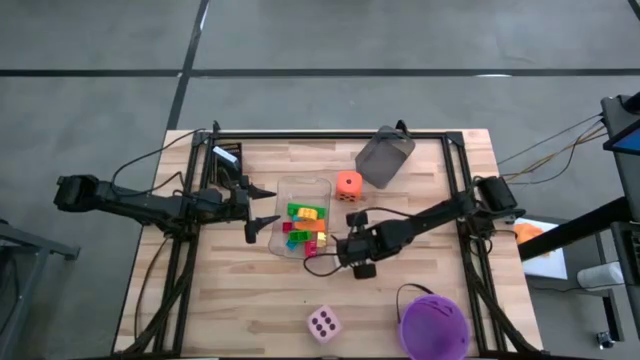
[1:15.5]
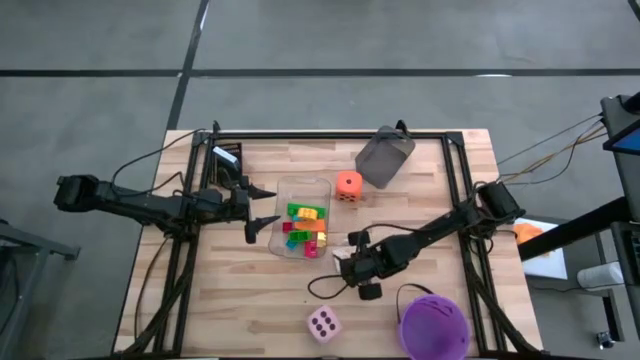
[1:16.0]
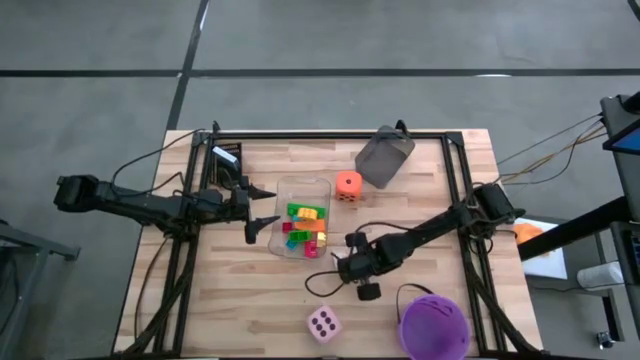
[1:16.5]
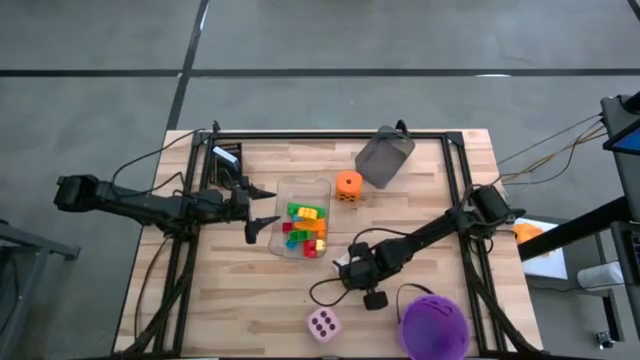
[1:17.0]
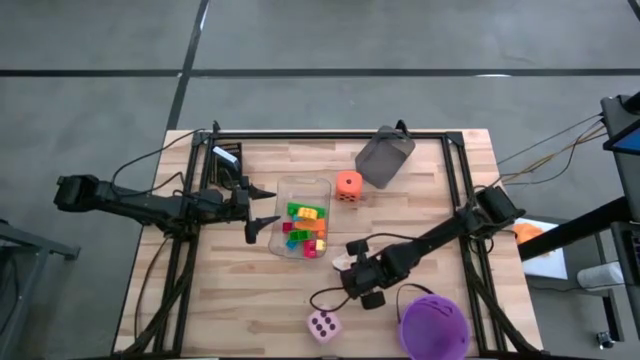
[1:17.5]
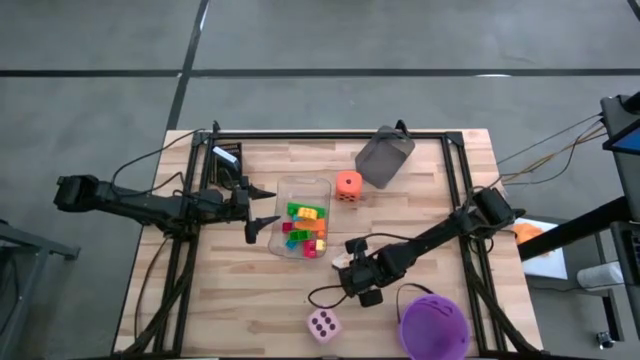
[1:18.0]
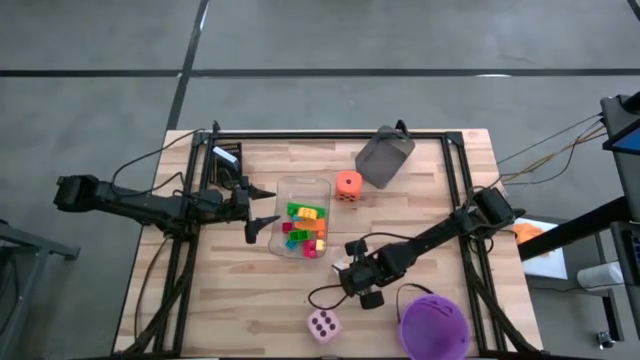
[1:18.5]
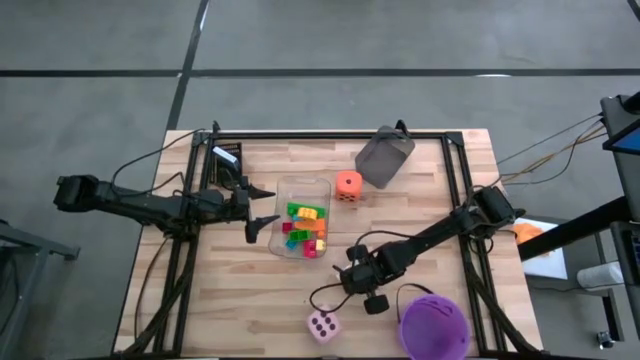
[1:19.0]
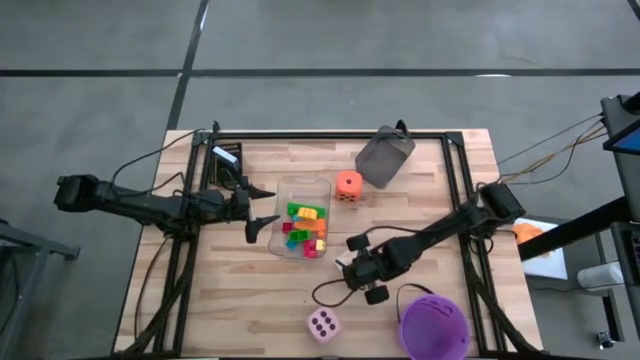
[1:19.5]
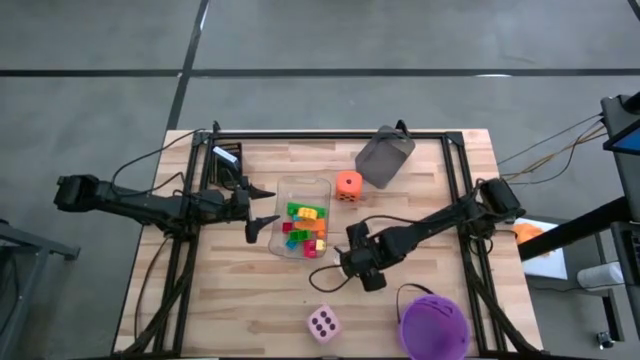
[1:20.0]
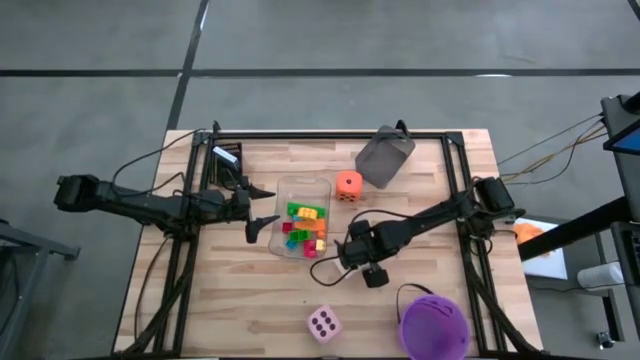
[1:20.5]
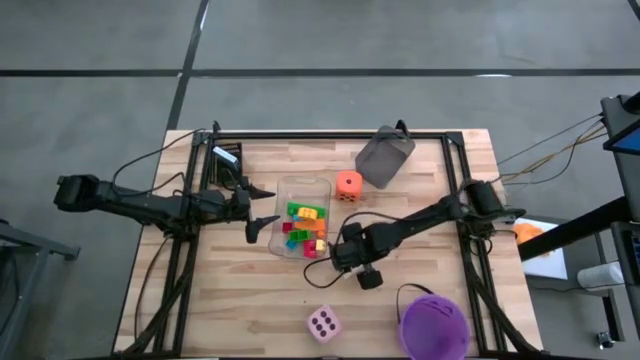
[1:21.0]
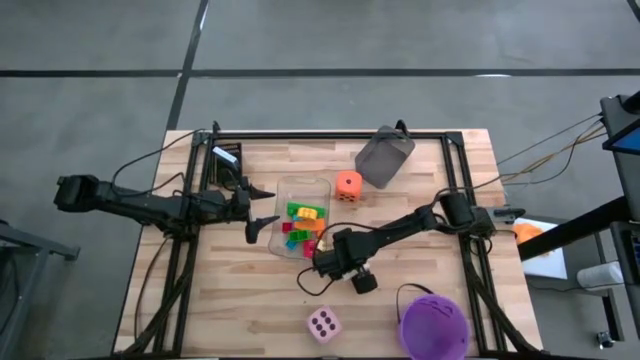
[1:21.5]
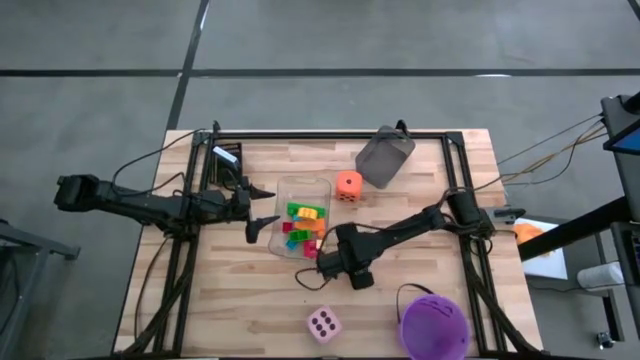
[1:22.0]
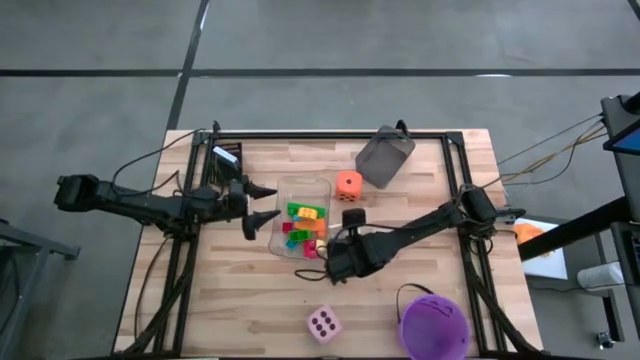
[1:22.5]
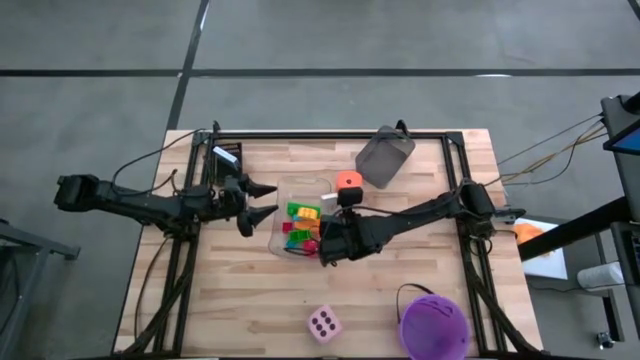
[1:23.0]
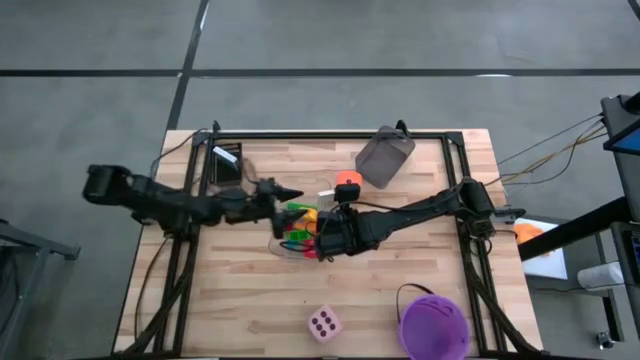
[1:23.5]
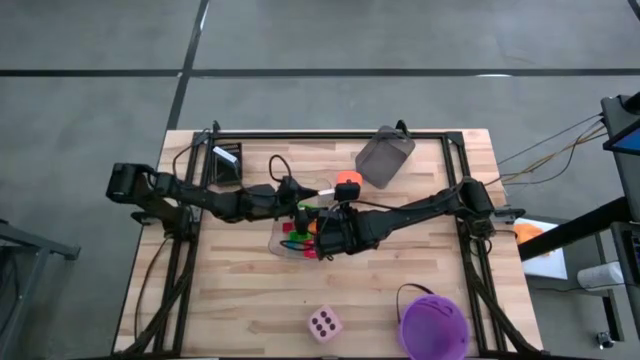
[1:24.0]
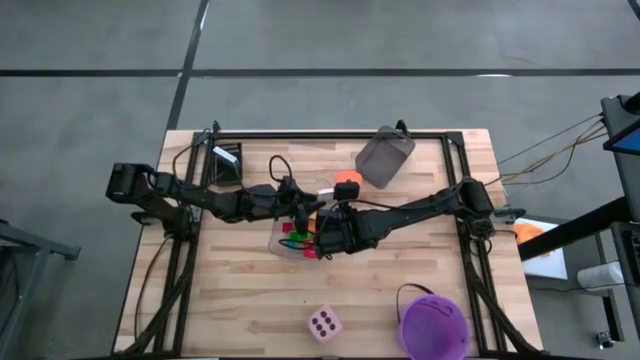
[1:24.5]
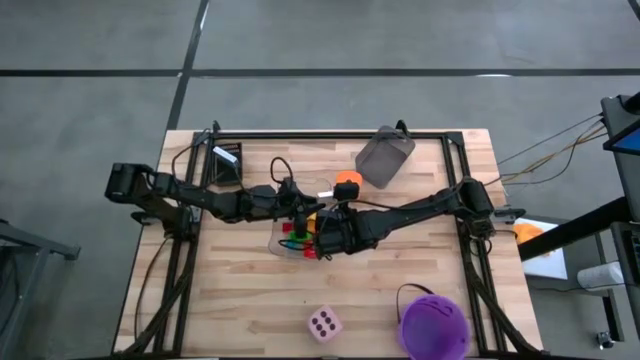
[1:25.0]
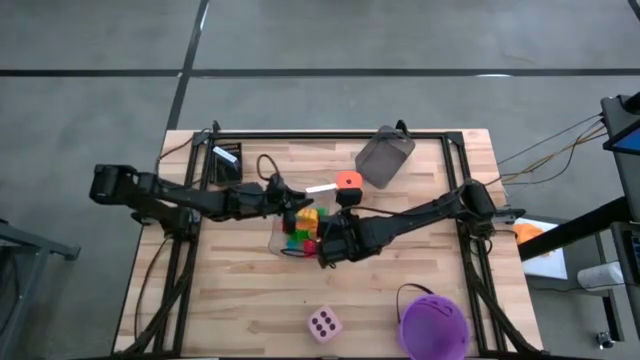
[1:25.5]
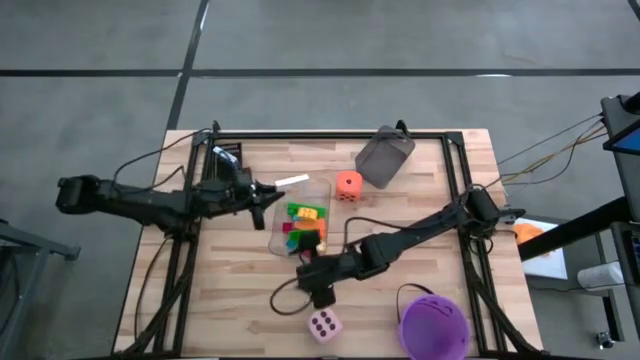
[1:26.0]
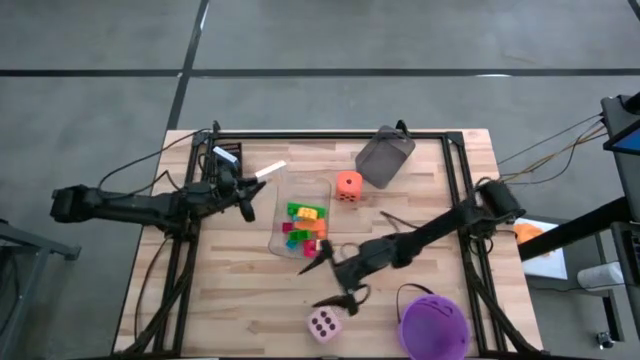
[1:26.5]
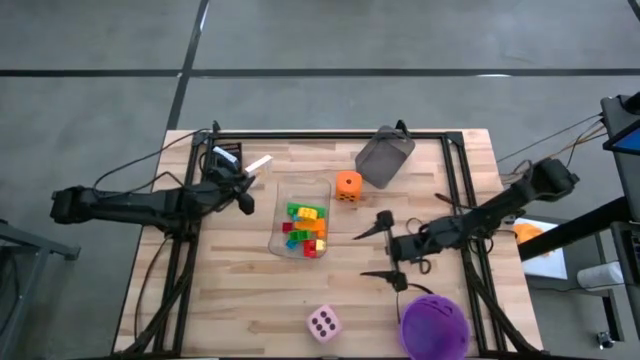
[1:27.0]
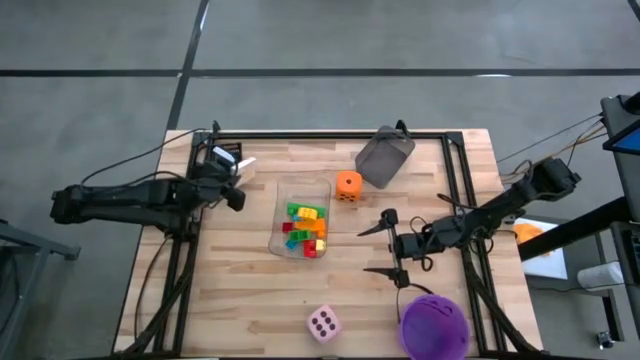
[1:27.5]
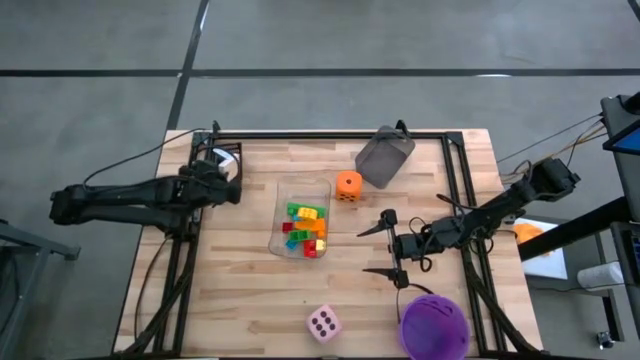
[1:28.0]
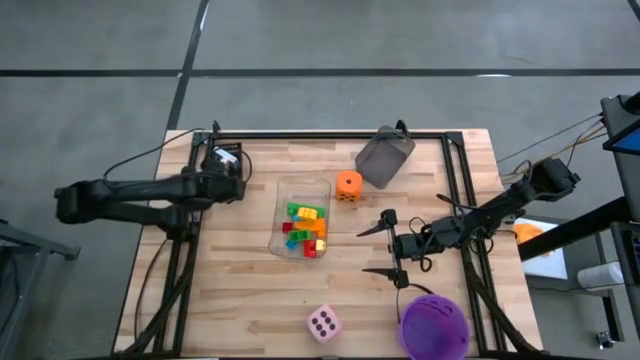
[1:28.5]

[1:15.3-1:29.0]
Task: Pick & Place Toys
Put the orange deck of cards into the black basket

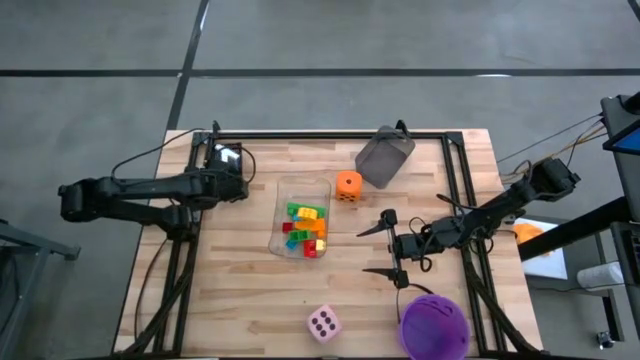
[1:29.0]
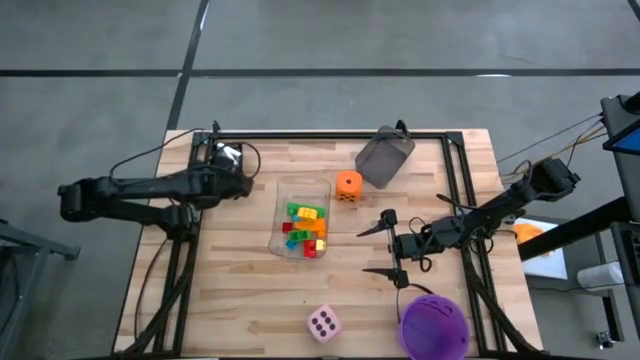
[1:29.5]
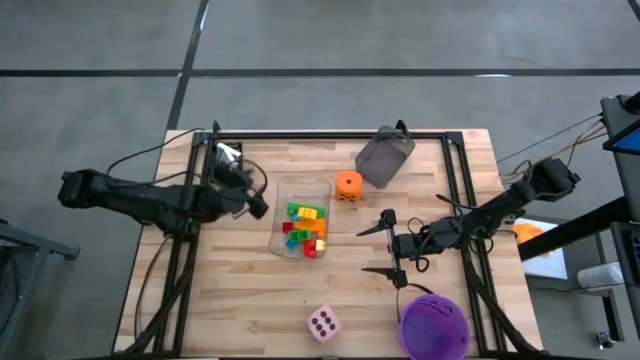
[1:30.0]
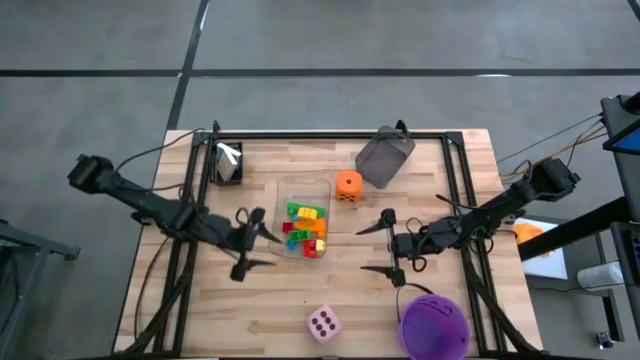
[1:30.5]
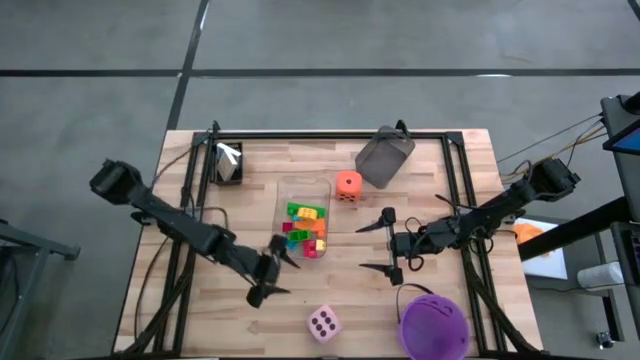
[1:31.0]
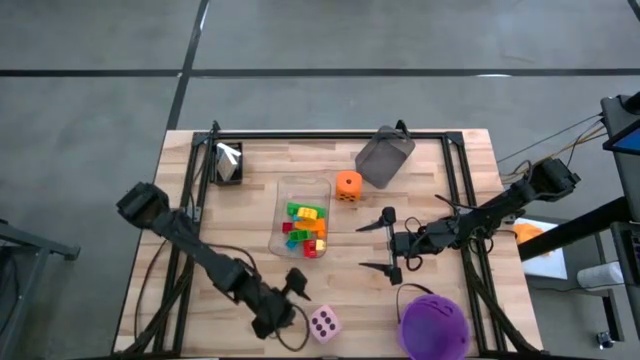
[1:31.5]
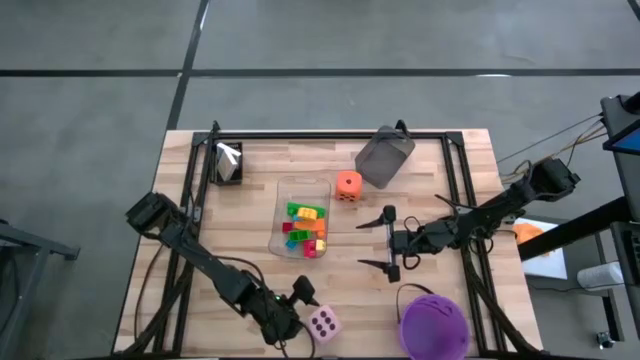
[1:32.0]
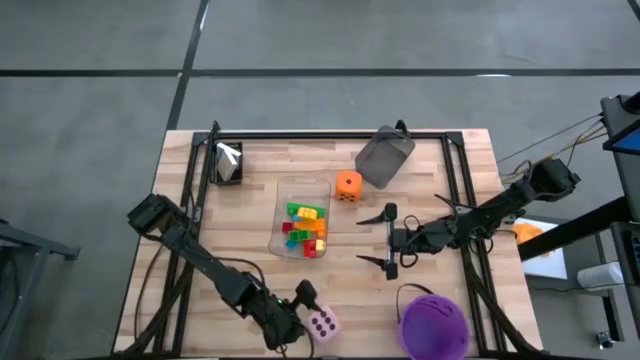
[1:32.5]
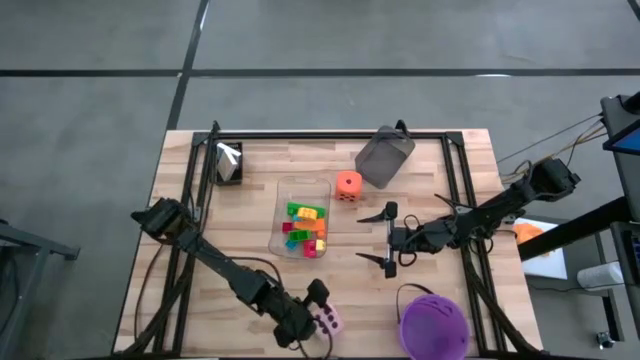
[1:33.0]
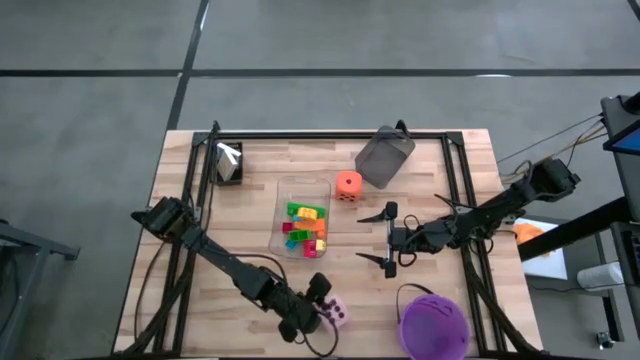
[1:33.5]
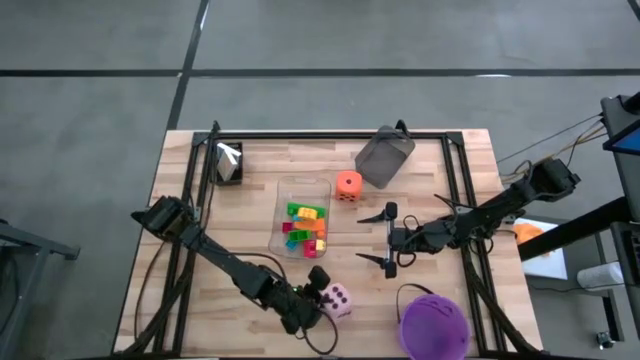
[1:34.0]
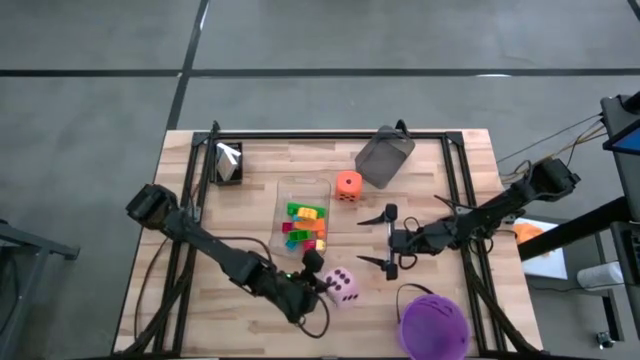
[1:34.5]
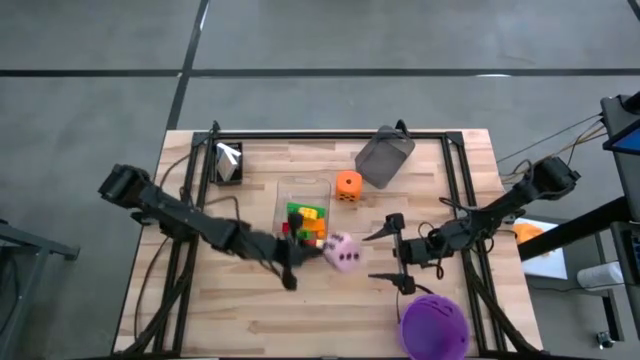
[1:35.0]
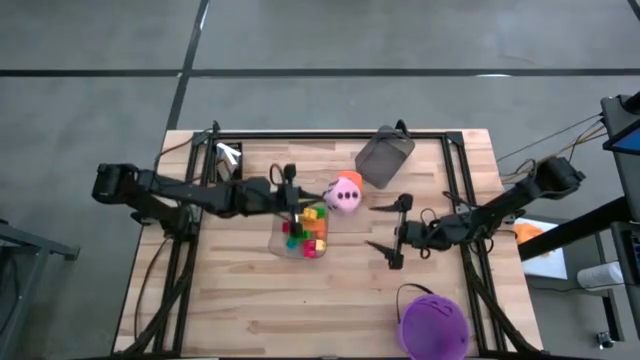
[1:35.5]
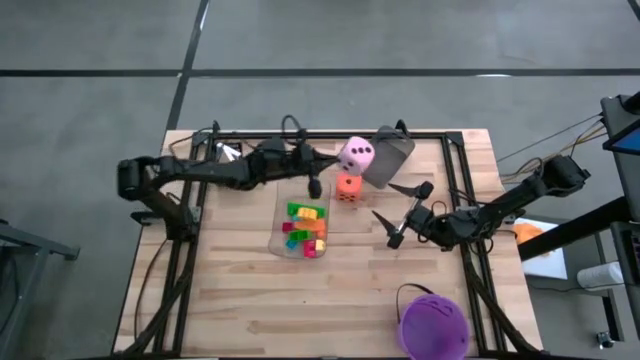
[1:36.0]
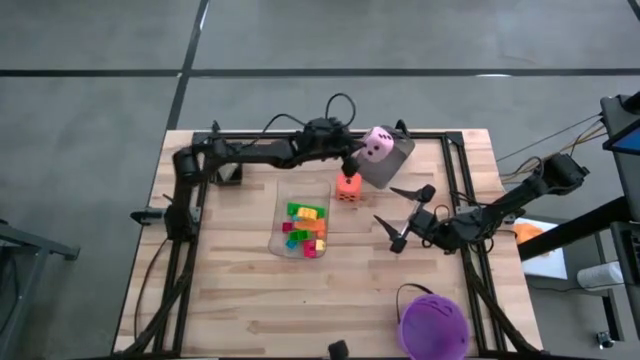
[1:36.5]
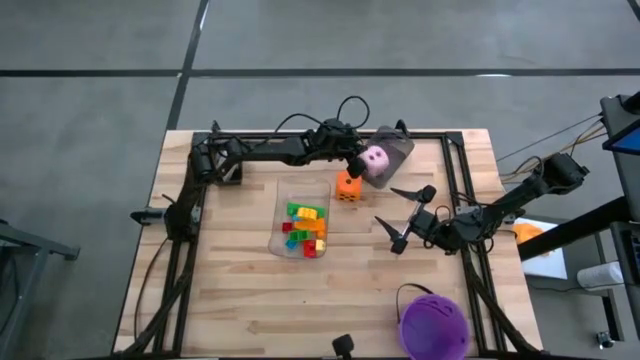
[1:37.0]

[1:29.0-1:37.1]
Put the pink dice into the black bin
